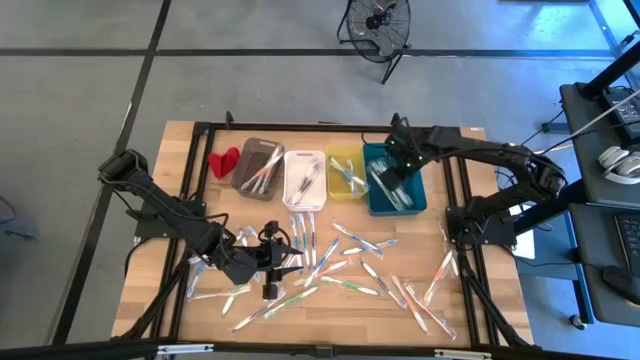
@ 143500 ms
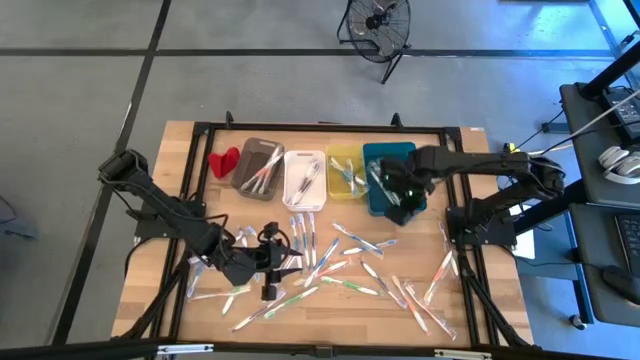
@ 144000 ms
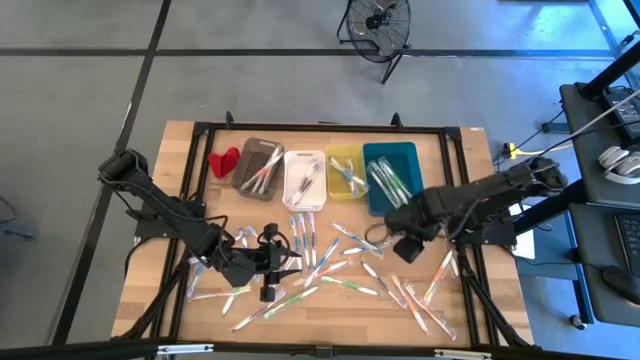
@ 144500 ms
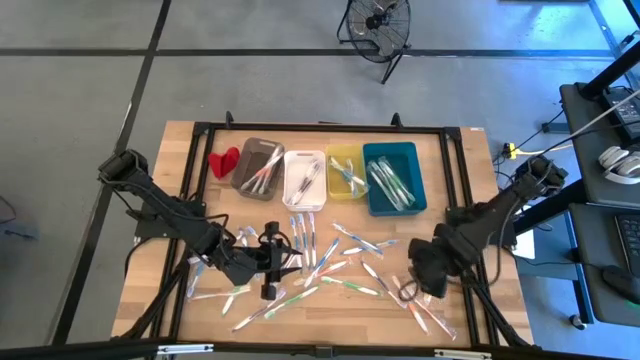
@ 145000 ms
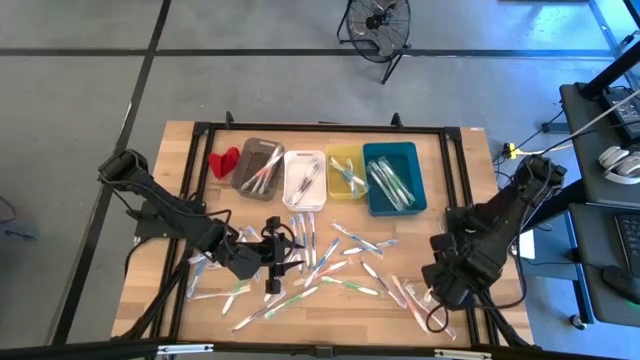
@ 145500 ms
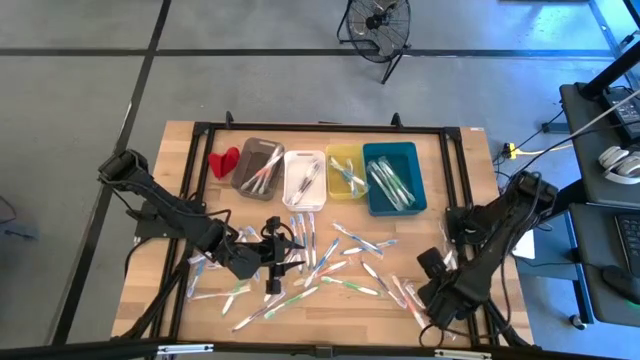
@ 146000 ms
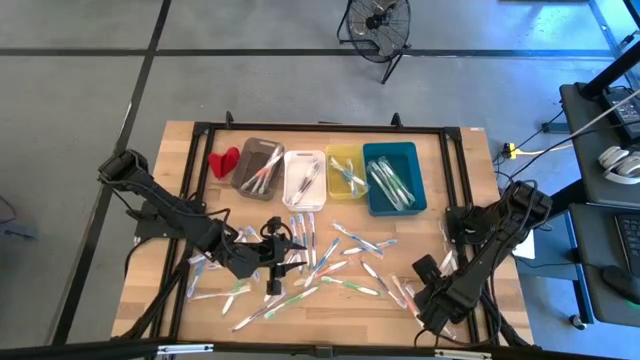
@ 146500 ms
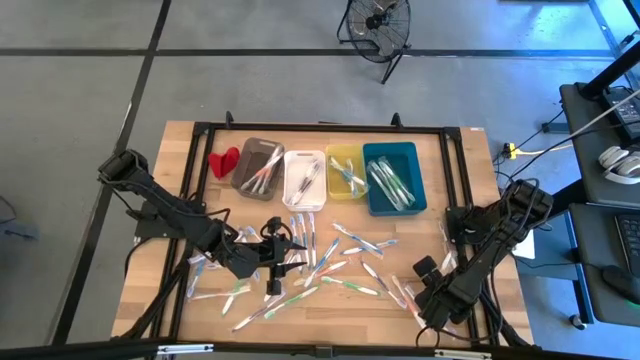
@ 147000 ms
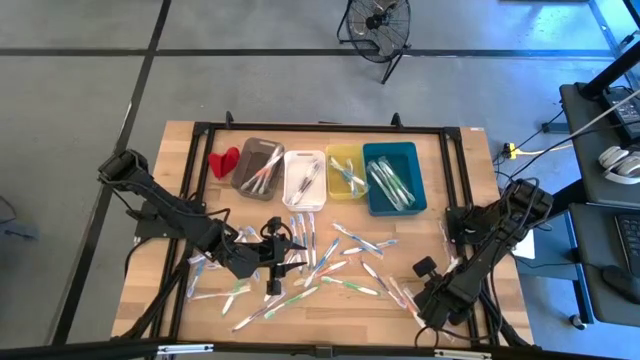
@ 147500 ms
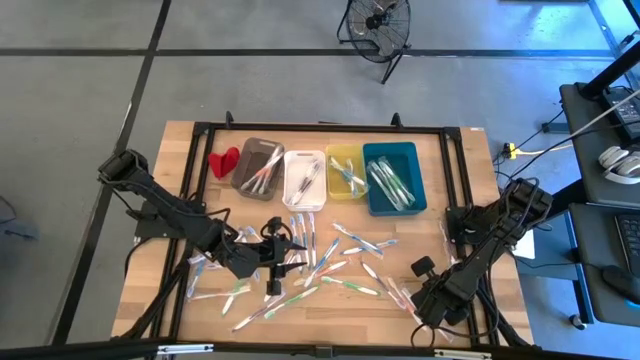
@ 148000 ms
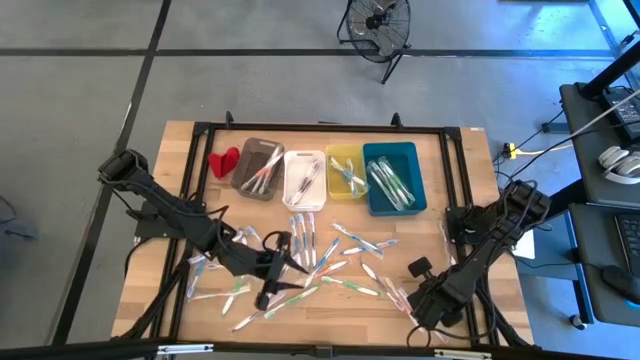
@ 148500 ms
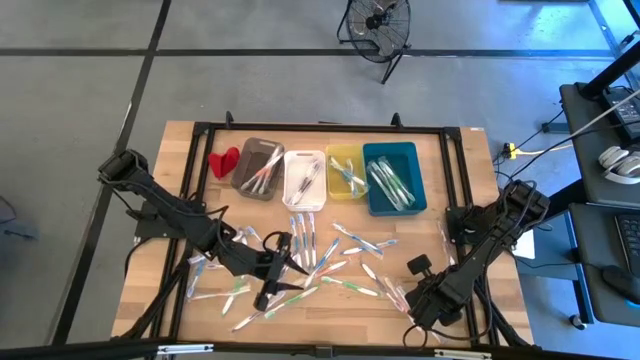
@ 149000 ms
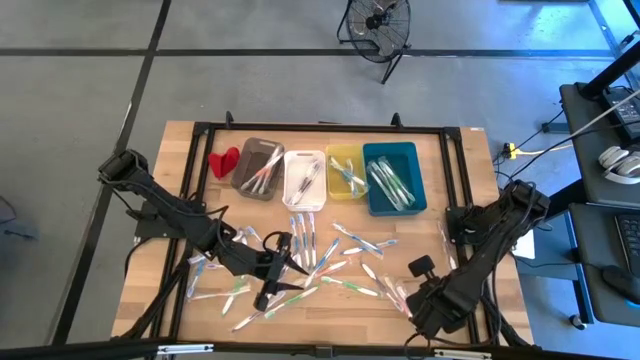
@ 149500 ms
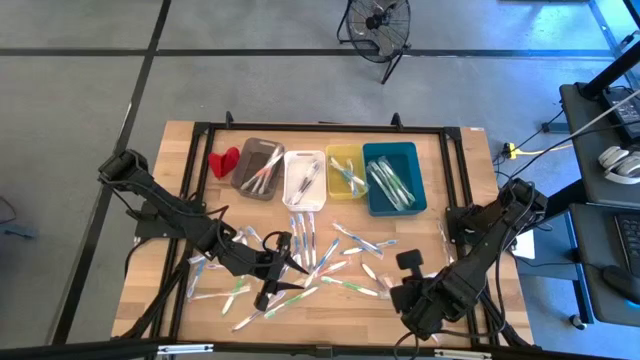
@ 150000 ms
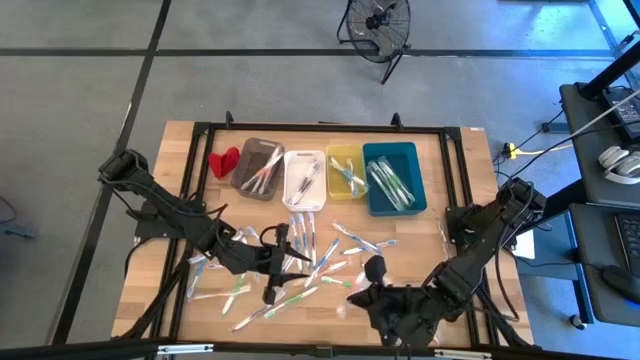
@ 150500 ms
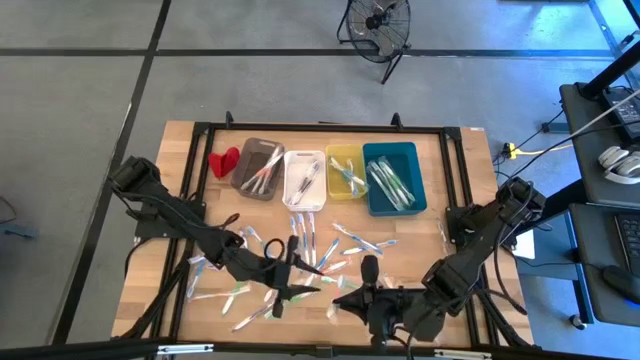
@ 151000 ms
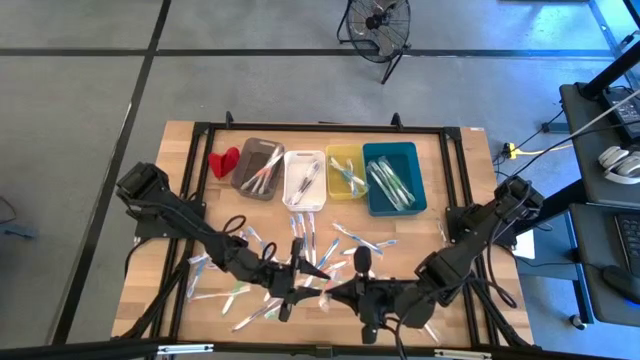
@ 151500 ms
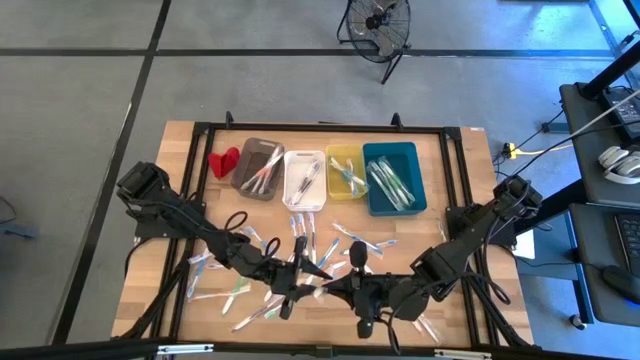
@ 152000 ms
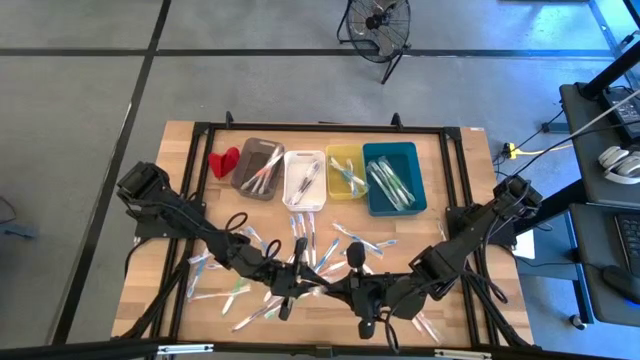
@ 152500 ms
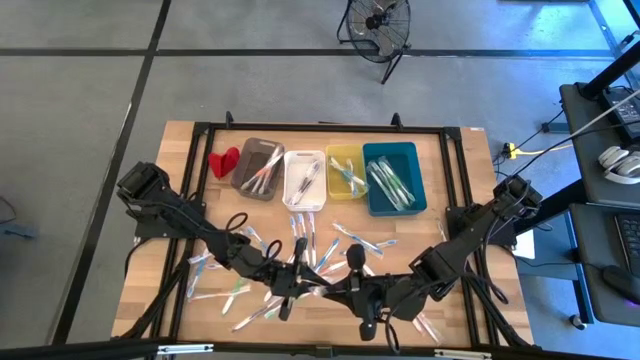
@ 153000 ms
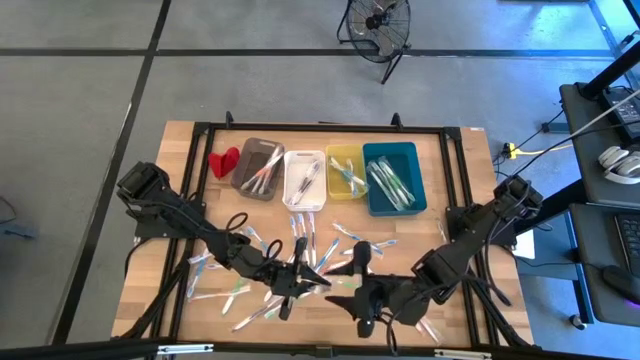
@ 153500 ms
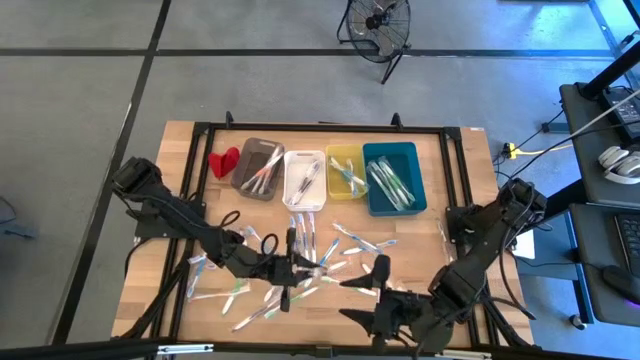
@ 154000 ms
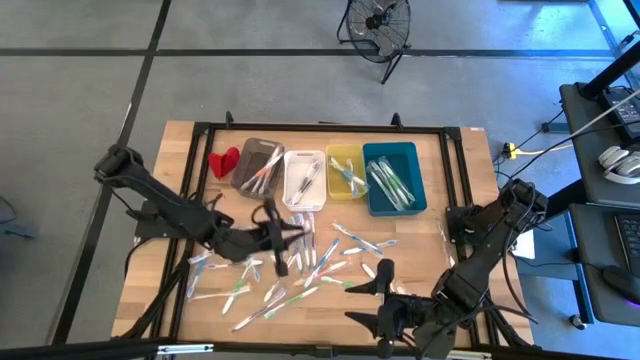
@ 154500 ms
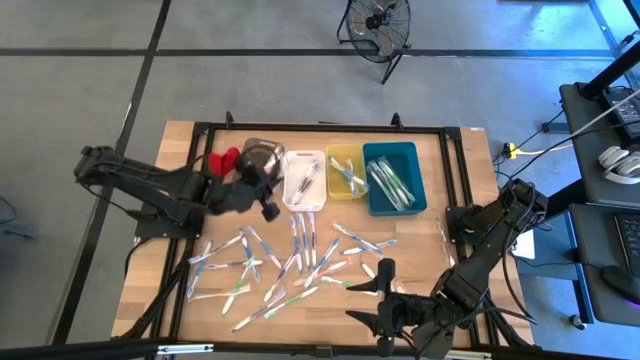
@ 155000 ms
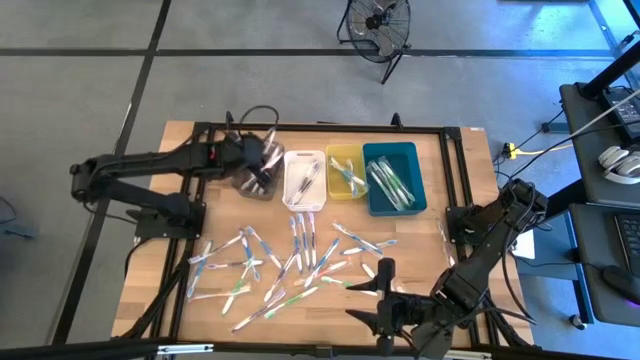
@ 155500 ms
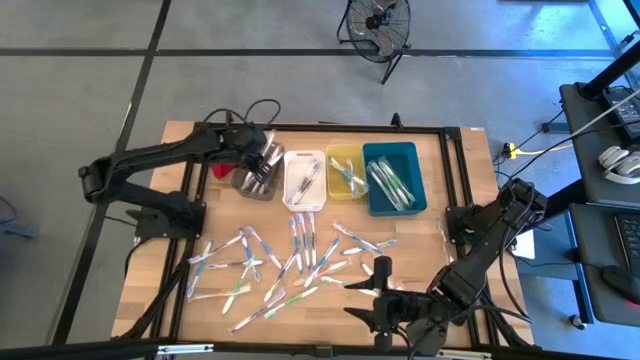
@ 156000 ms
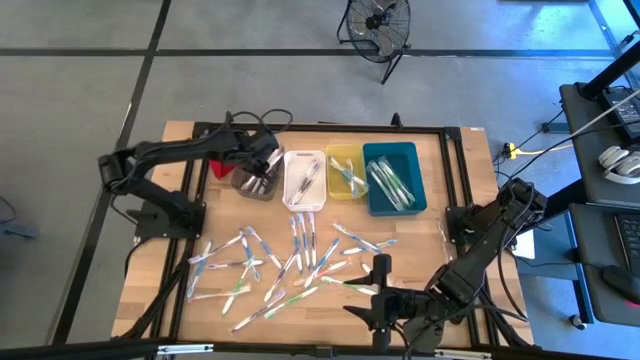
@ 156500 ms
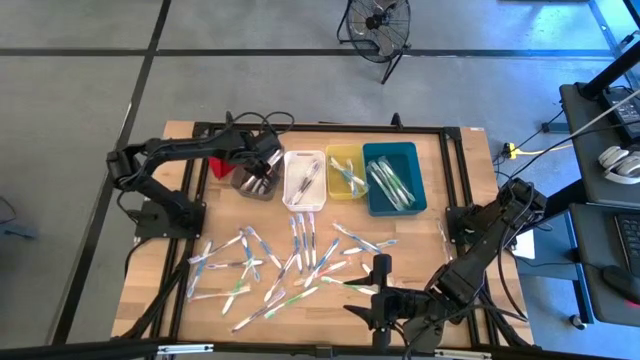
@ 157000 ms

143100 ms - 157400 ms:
Task: Pick & Place Toothbrushes
Put the orange toothbrush into the black bin

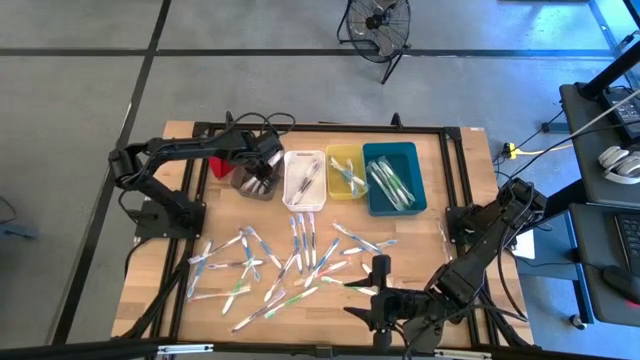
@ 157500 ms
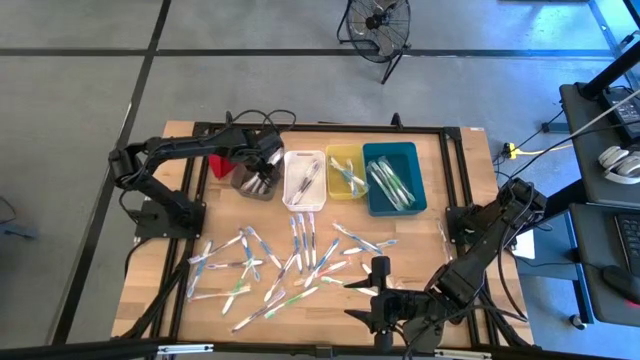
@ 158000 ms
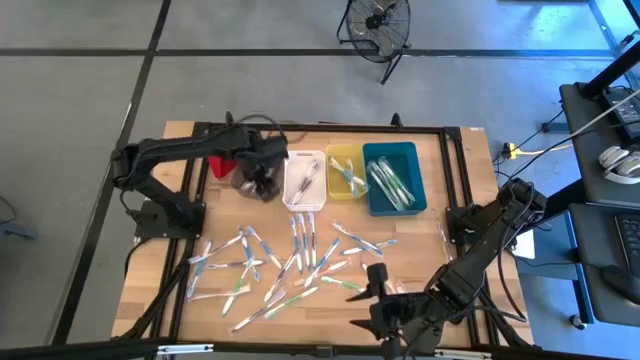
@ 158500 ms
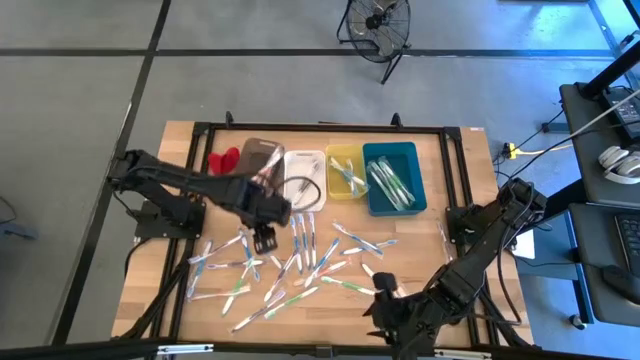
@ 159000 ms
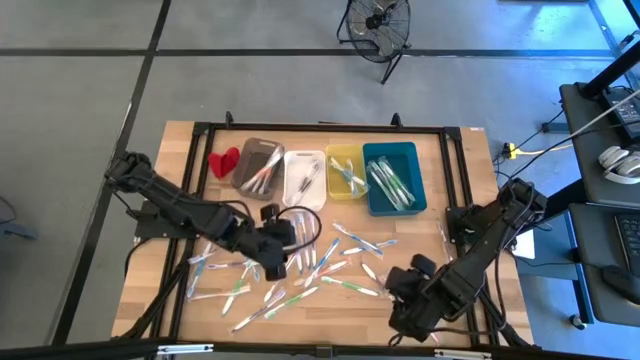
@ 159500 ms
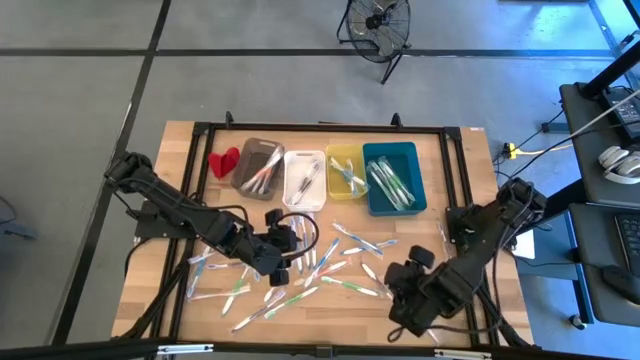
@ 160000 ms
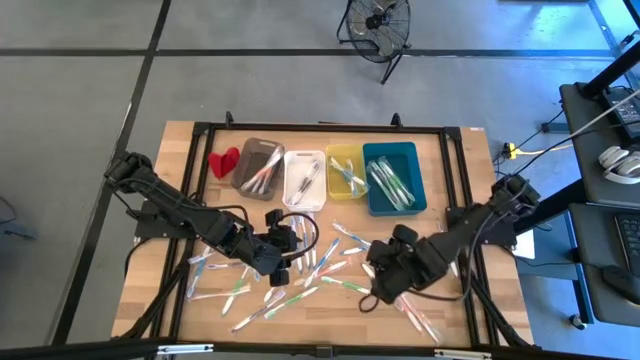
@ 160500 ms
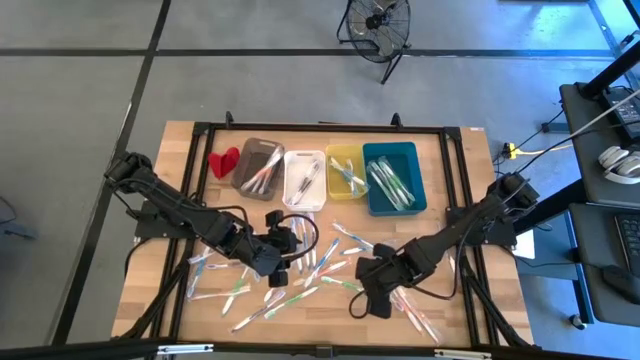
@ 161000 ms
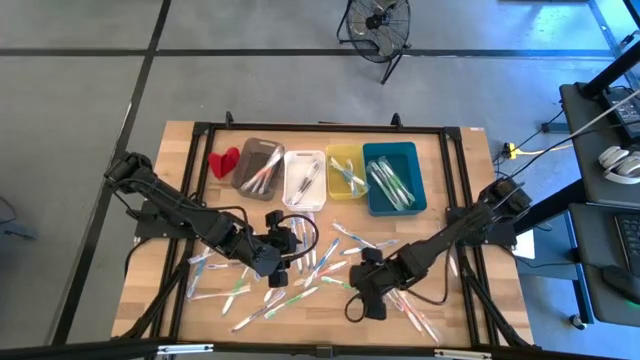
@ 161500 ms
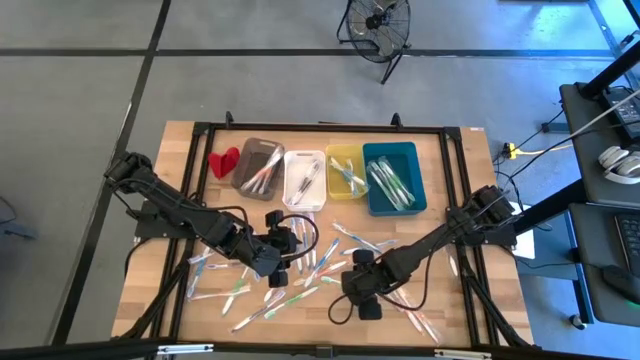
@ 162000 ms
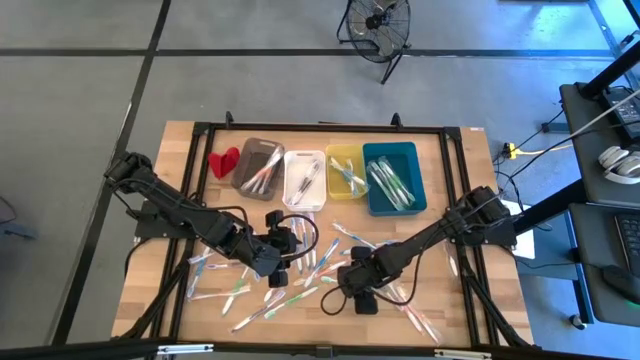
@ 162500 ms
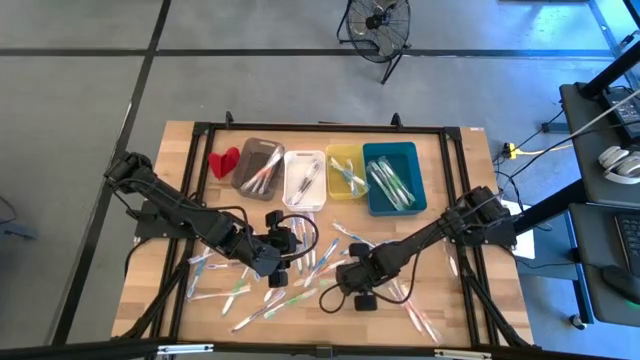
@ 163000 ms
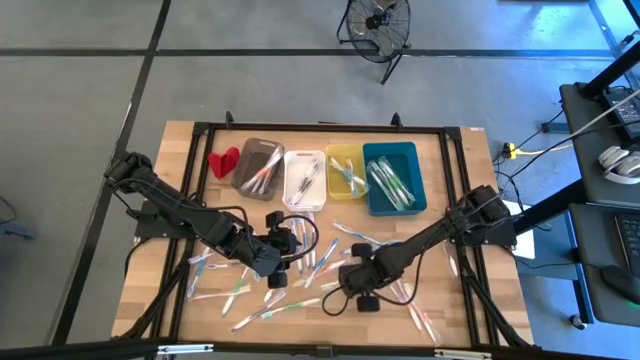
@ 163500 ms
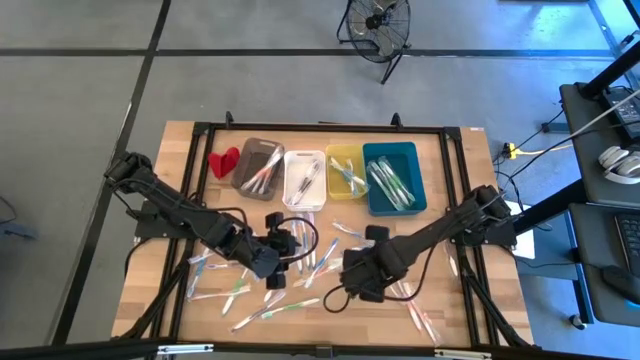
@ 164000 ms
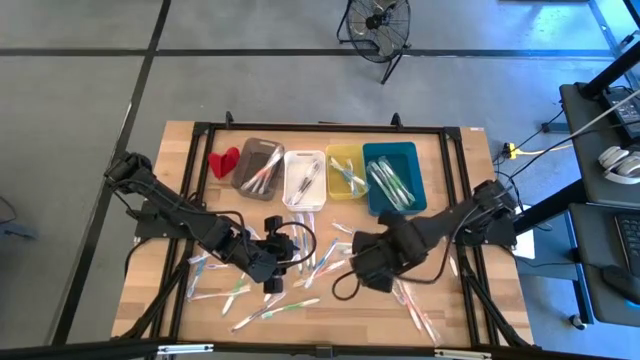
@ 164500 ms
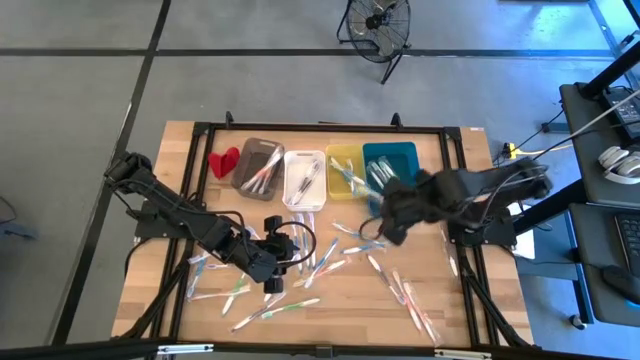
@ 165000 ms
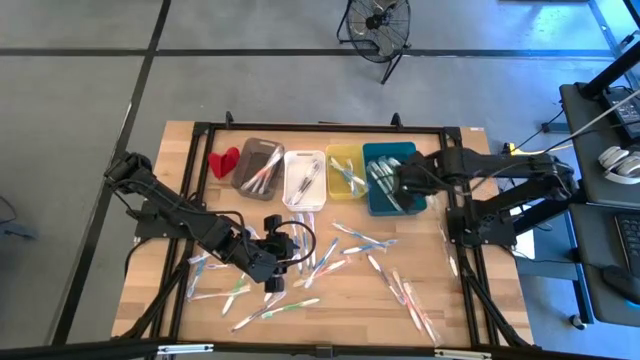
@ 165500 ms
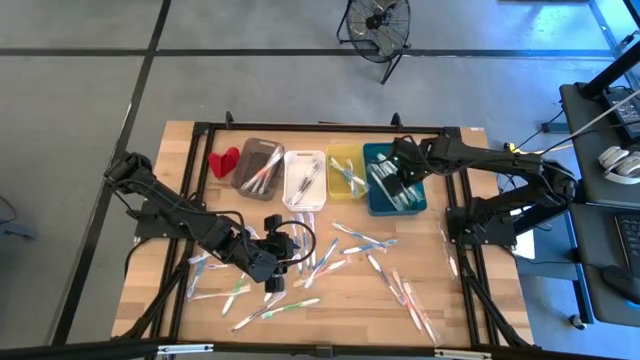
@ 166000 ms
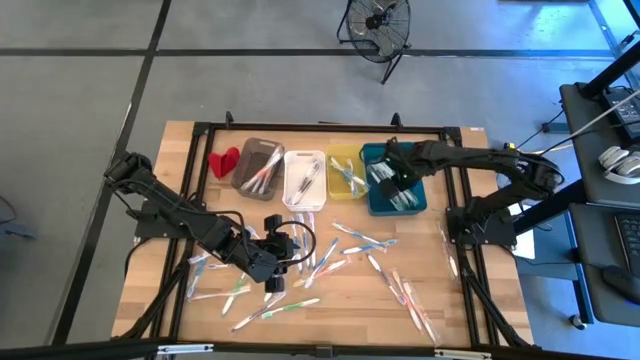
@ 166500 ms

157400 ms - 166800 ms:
Put the right green toothbrush into the blue bin
